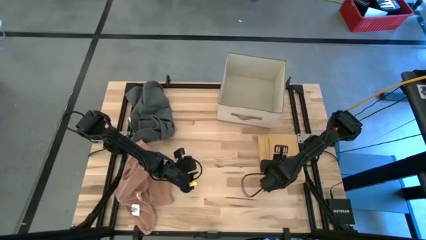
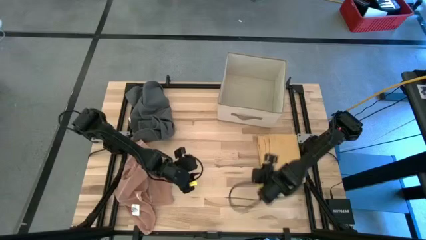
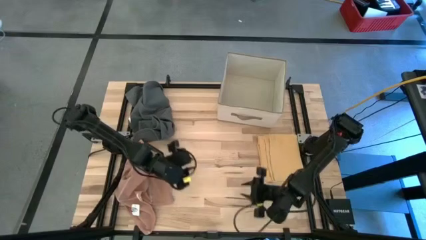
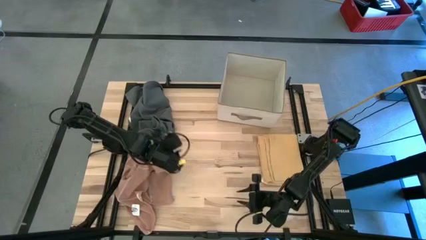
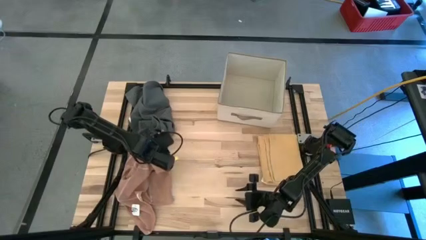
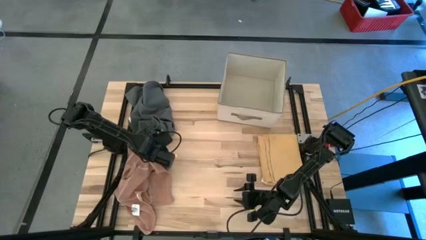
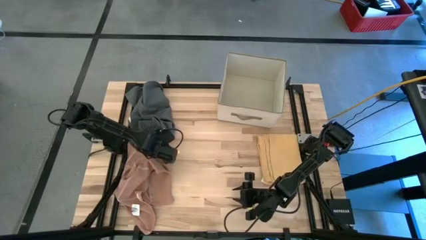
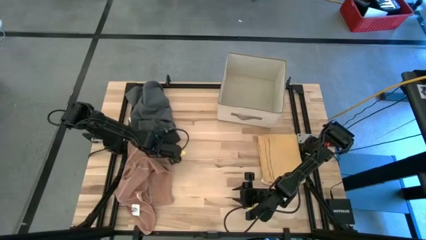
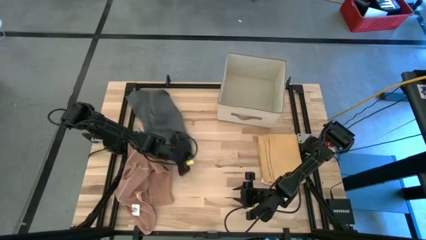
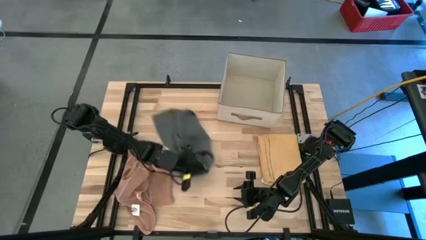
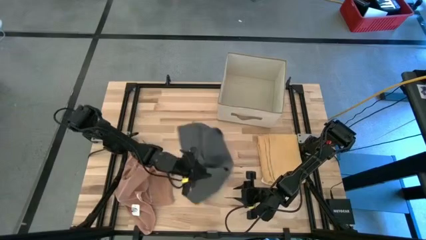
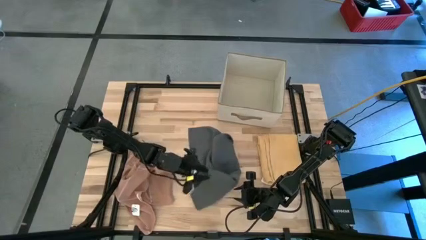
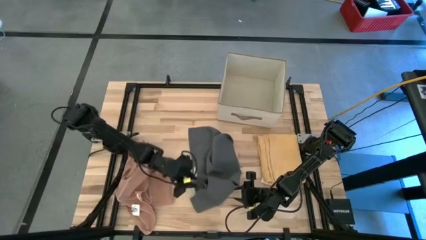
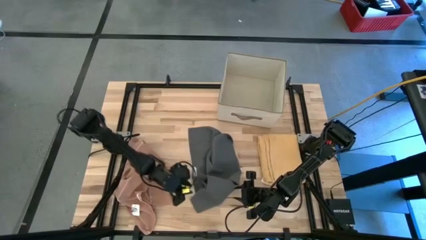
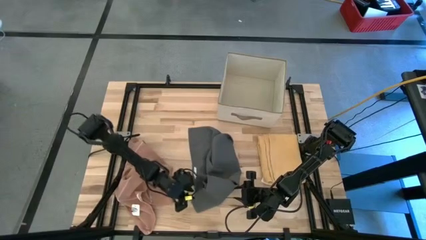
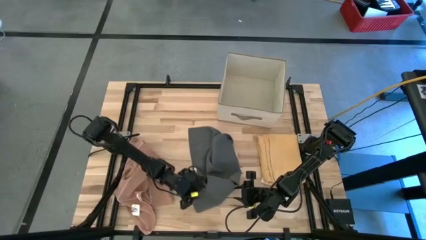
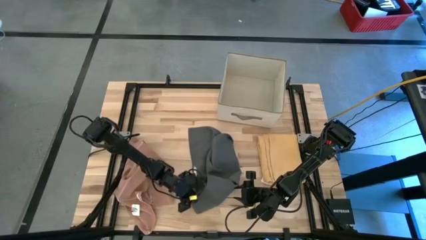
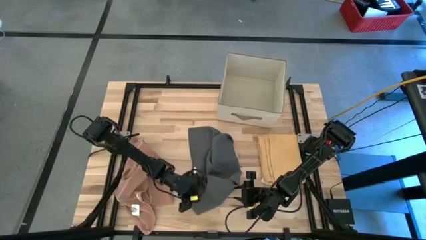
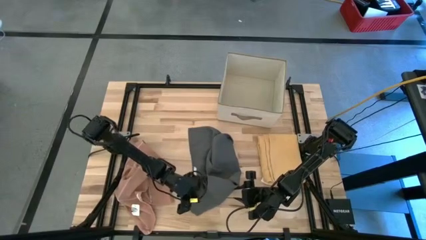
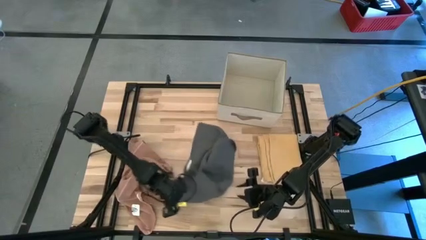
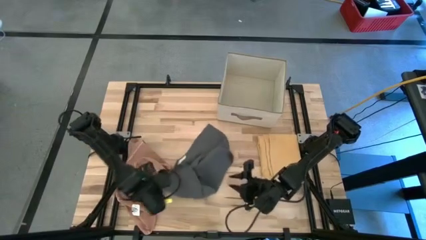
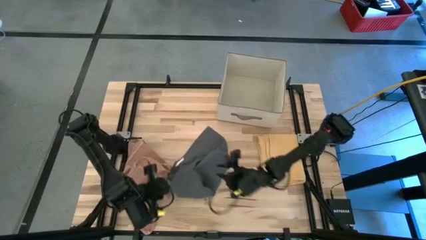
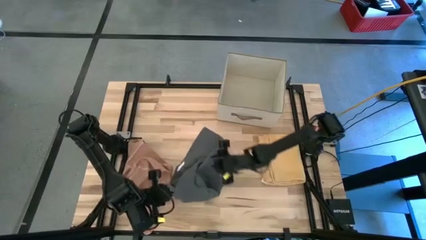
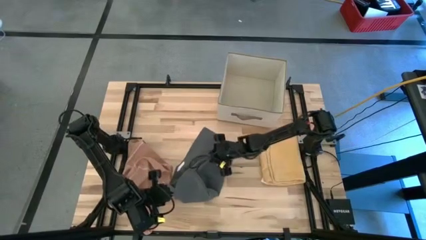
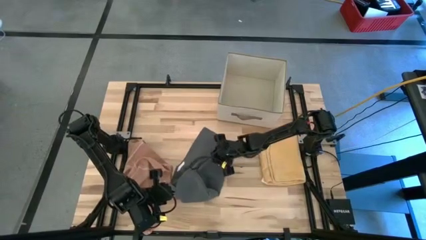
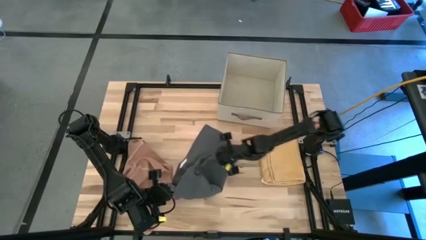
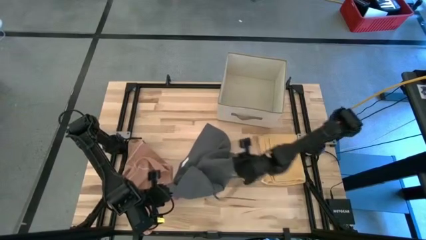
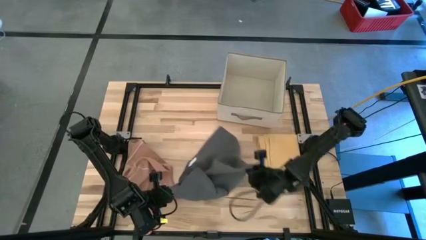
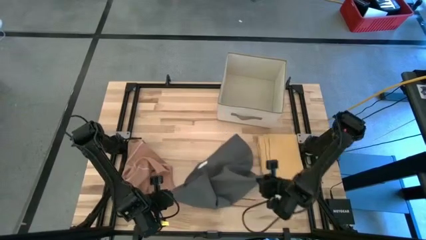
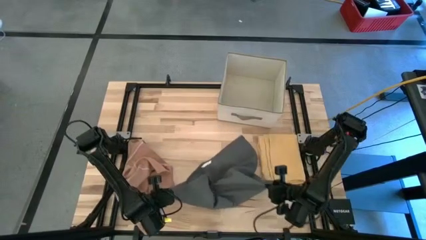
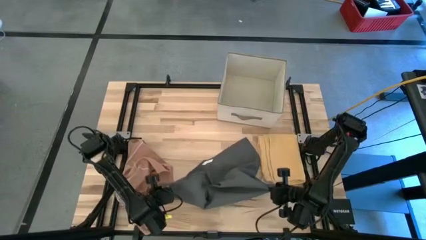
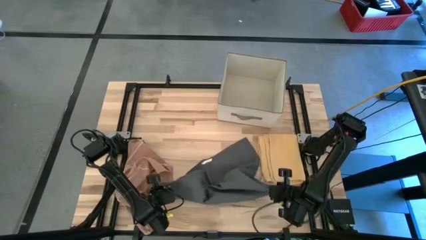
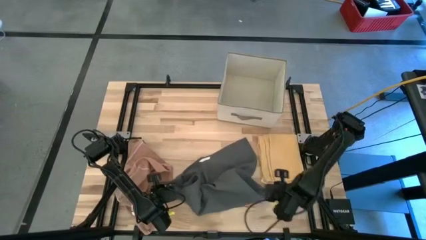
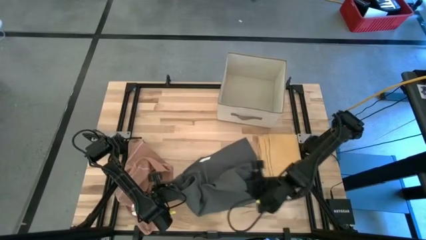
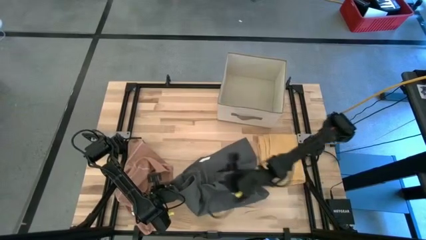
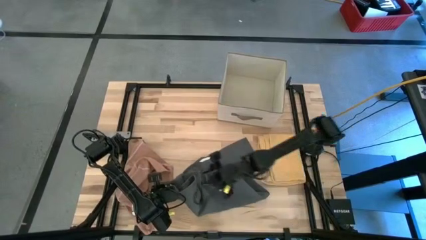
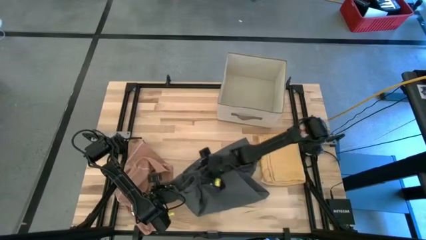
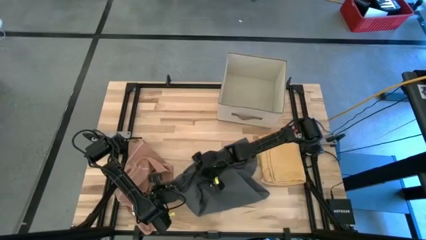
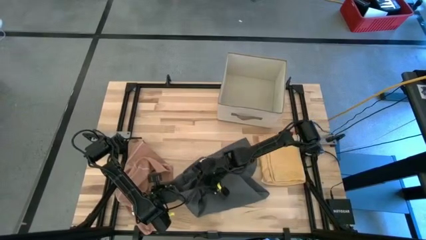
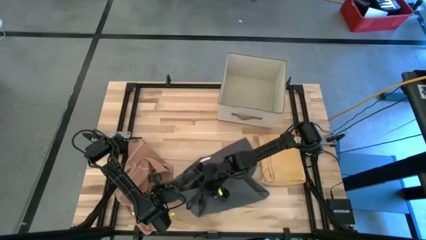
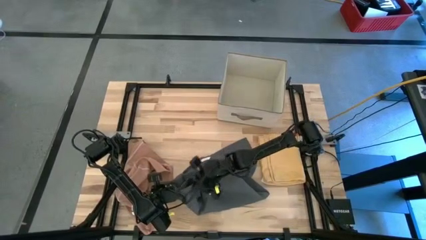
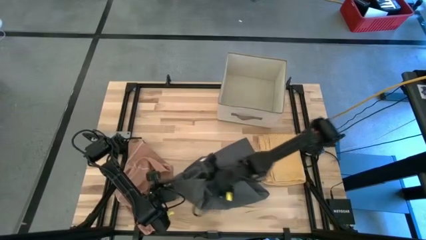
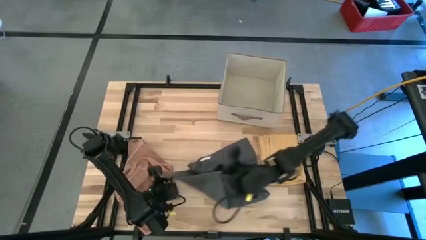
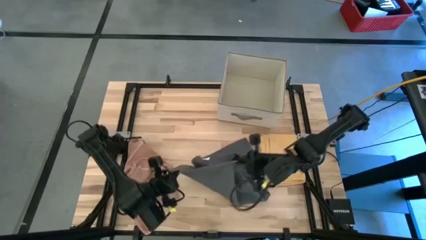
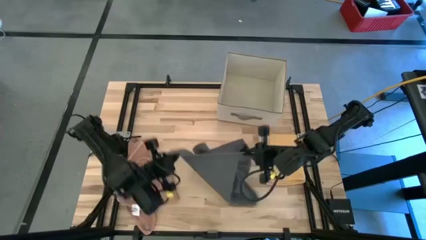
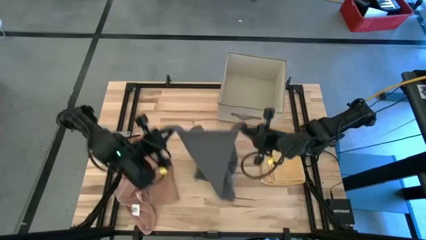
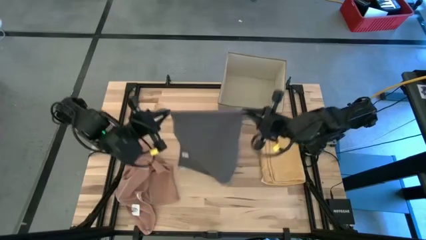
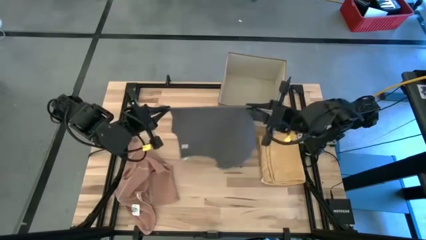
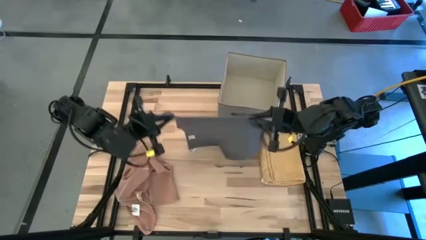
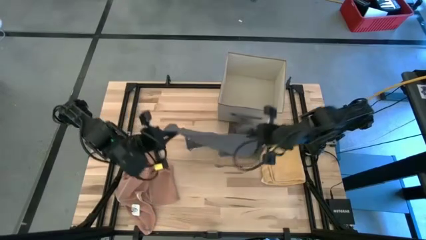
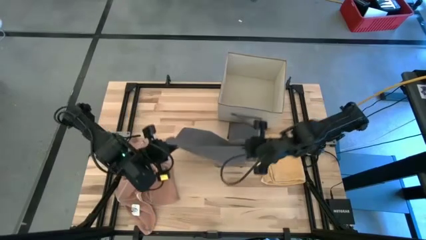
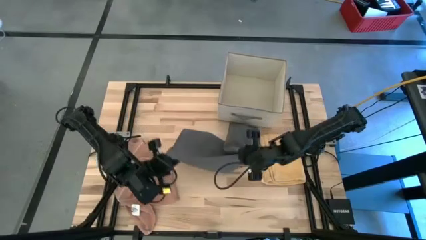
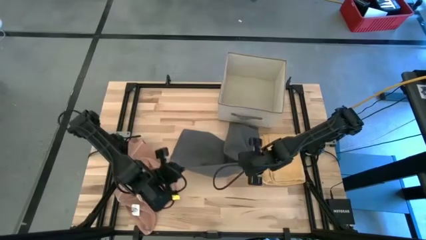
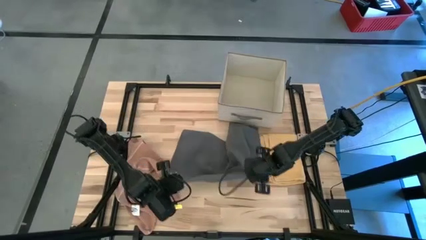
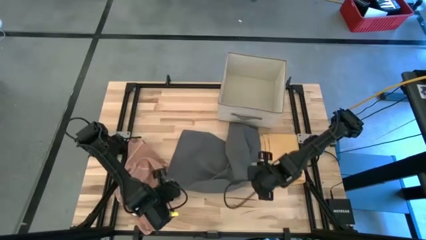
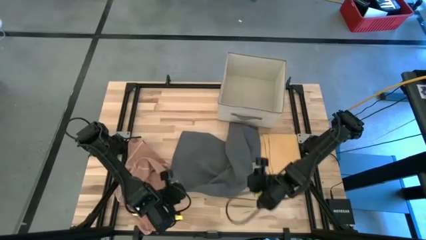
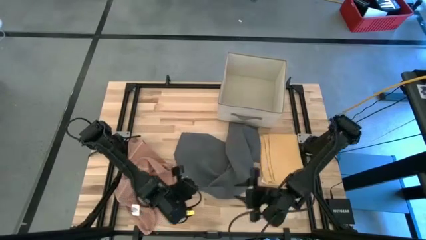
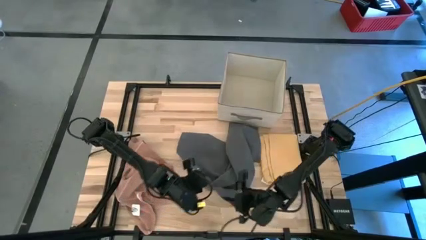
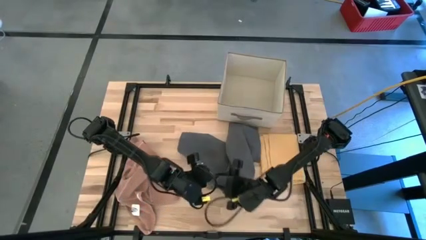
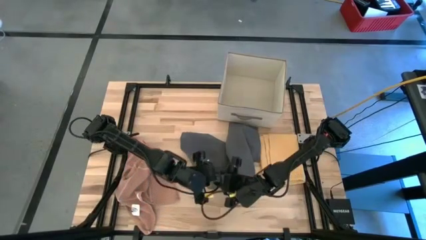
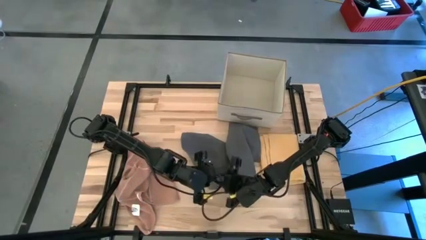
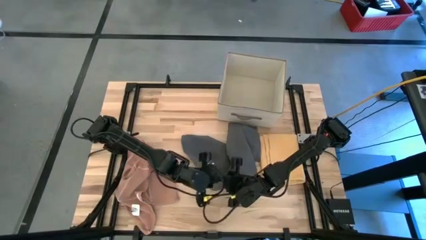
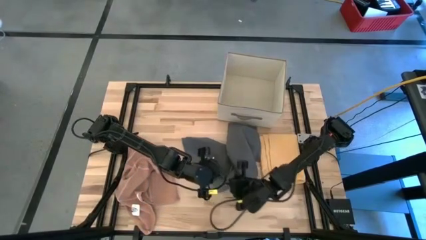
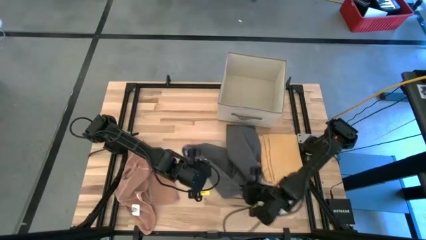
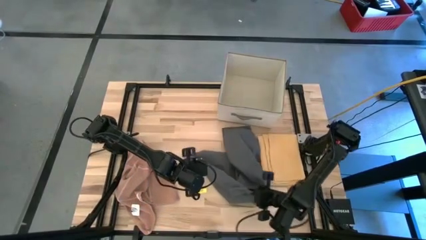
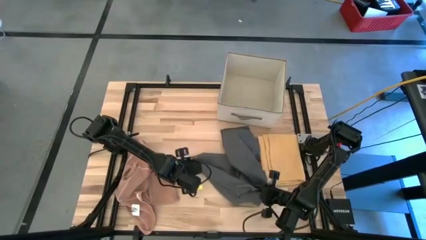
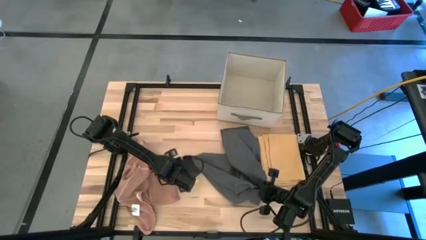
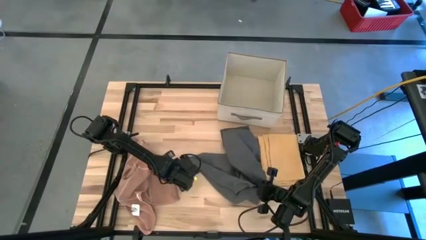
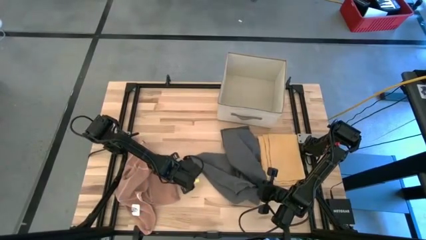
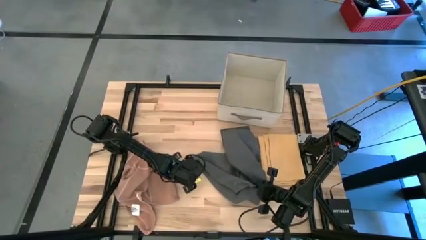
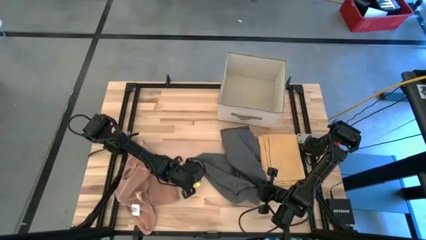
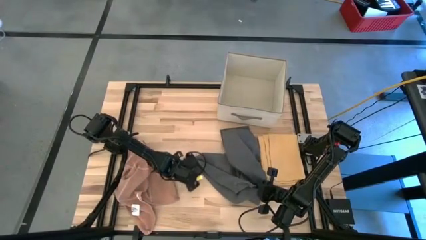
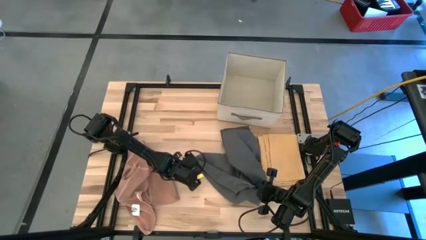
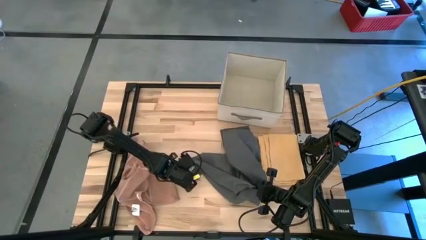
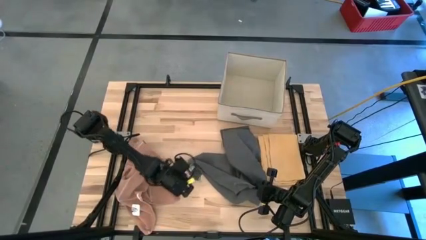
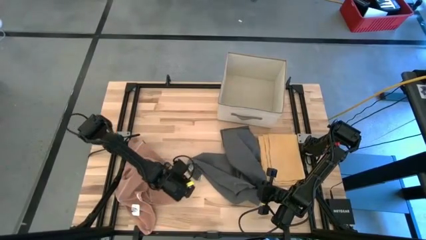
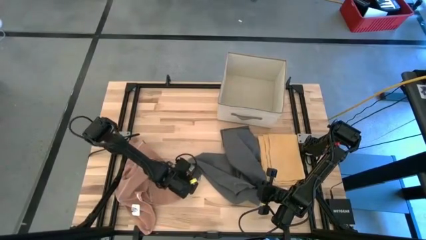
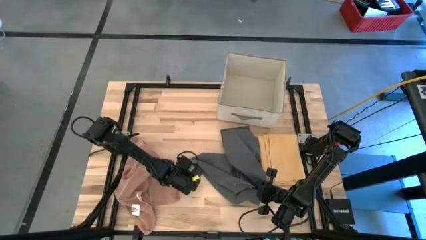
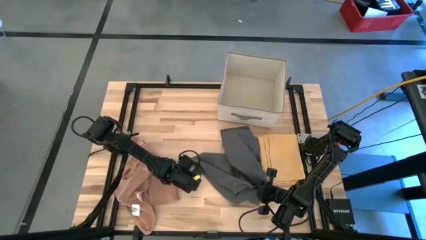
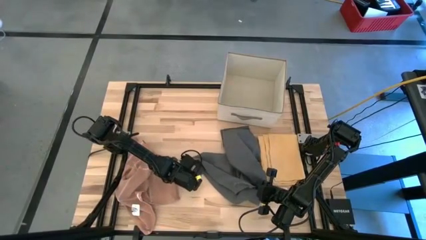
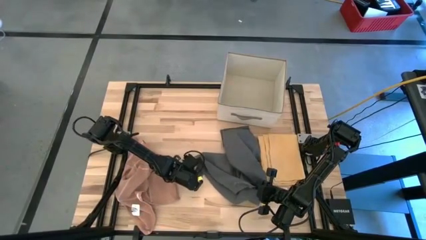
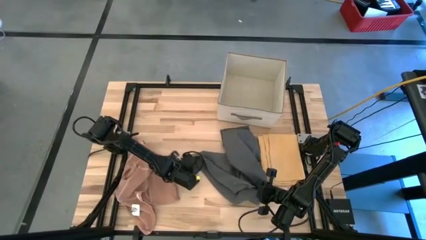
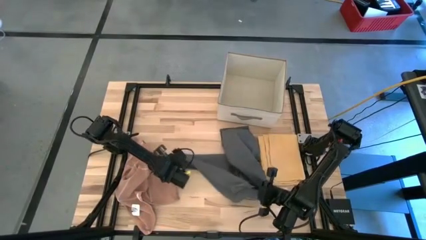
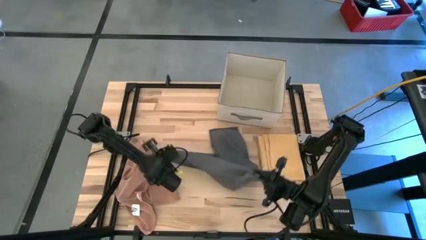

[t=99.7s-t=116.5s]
Task: Fold towel
Fold the gray towel
